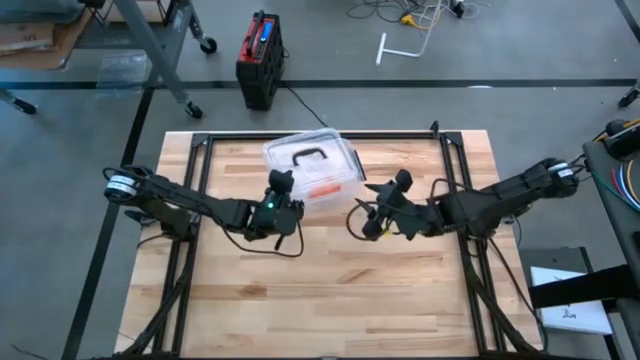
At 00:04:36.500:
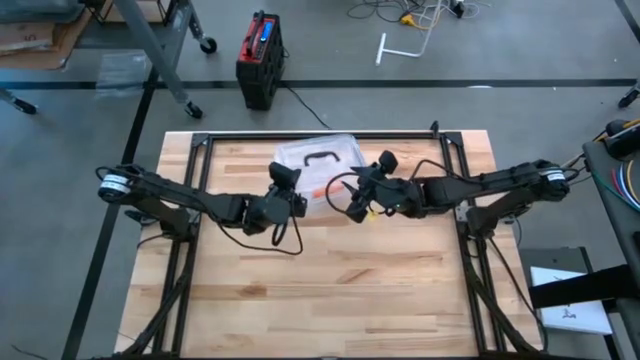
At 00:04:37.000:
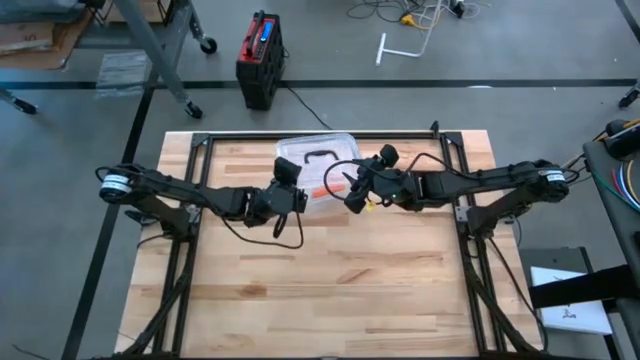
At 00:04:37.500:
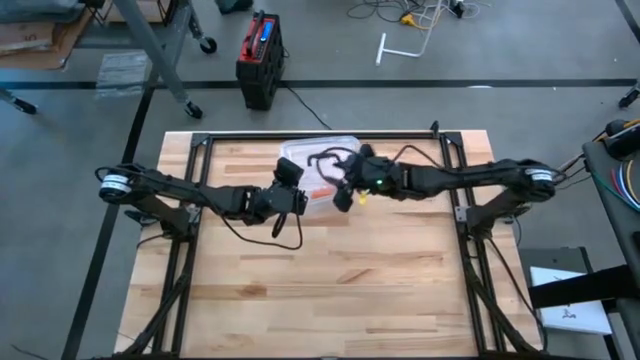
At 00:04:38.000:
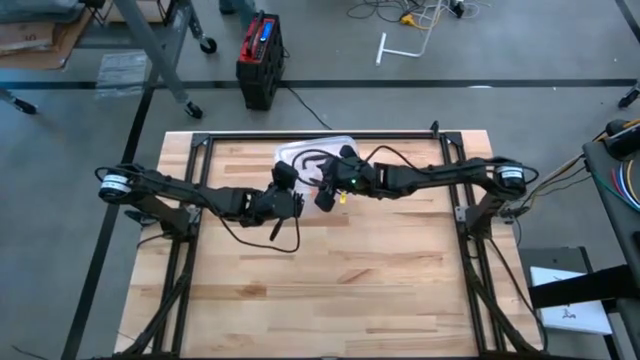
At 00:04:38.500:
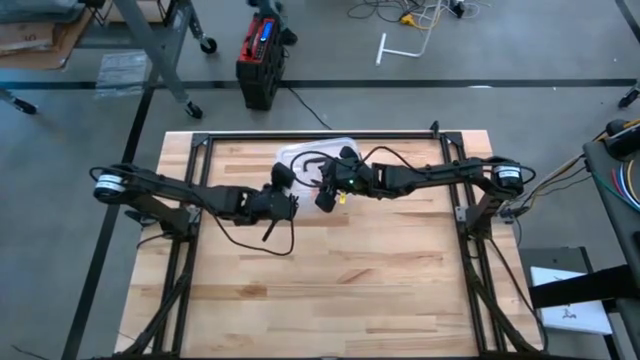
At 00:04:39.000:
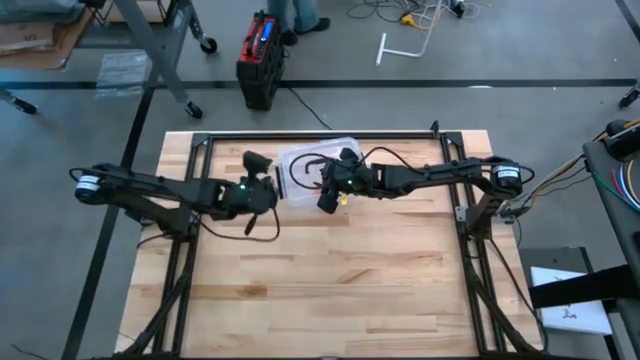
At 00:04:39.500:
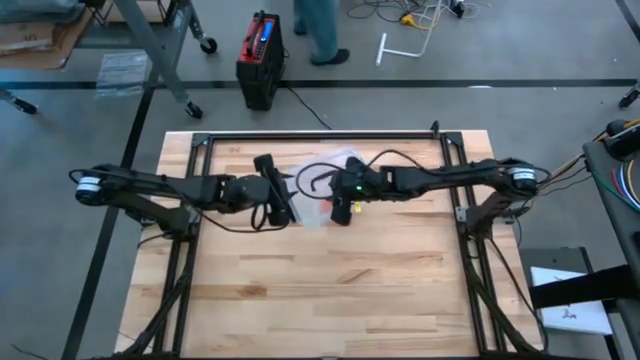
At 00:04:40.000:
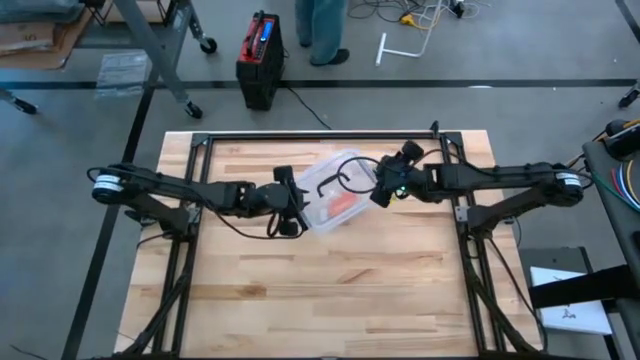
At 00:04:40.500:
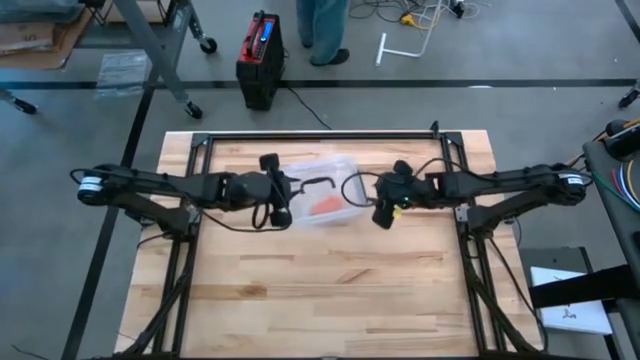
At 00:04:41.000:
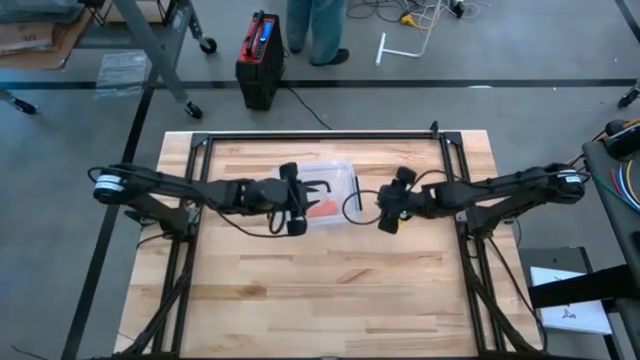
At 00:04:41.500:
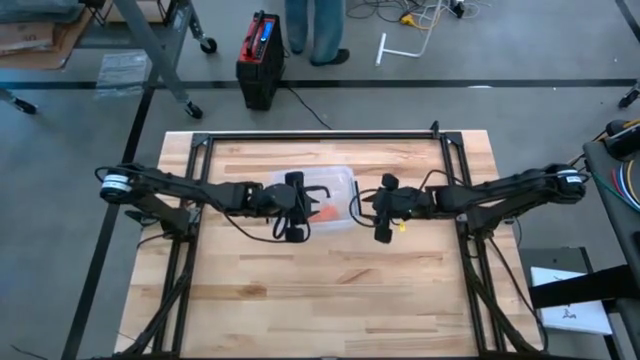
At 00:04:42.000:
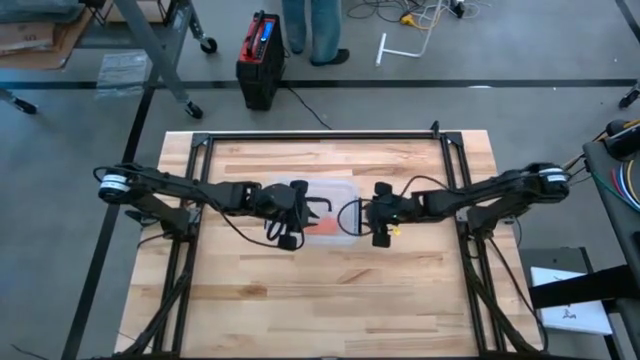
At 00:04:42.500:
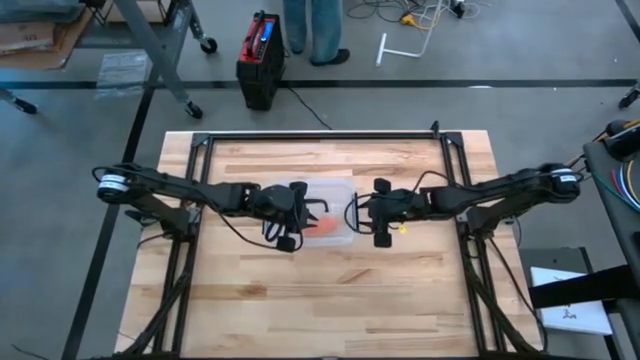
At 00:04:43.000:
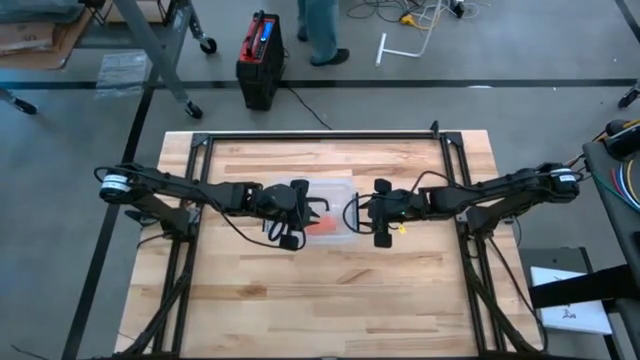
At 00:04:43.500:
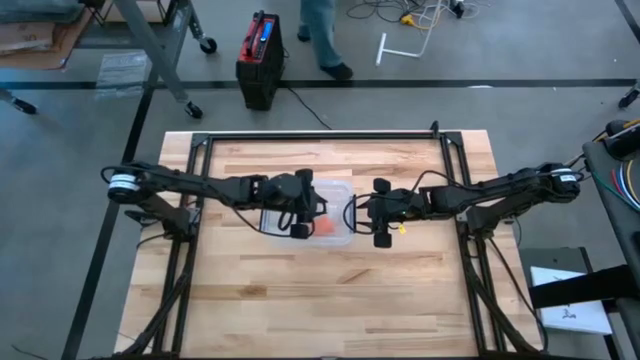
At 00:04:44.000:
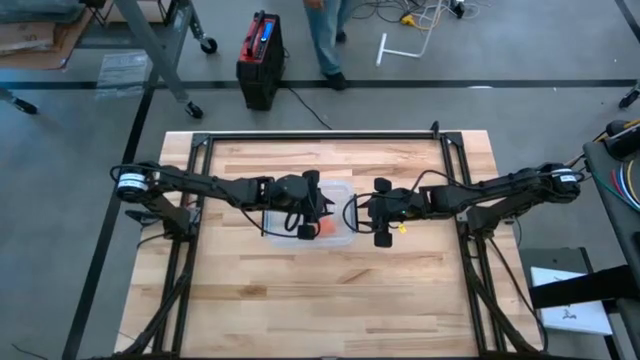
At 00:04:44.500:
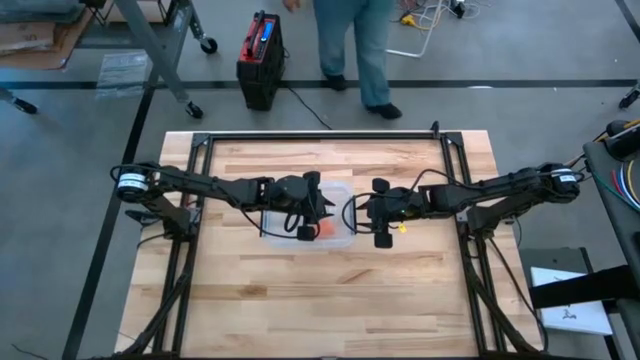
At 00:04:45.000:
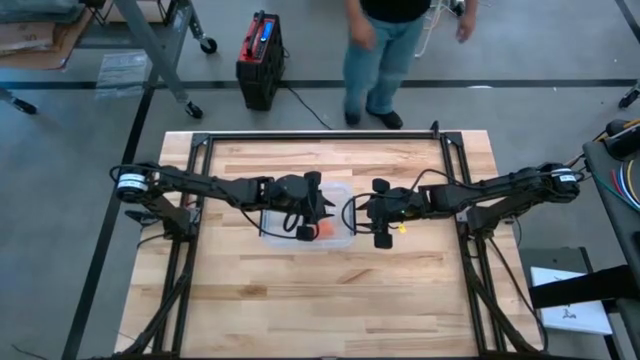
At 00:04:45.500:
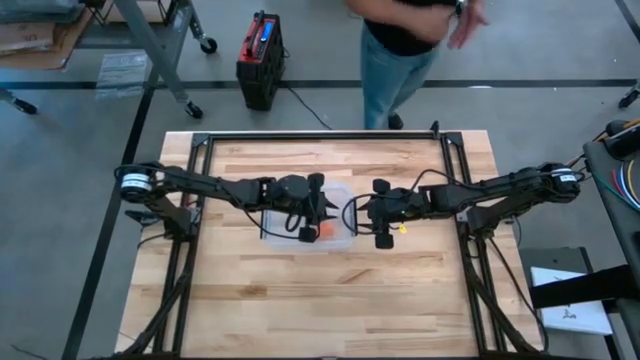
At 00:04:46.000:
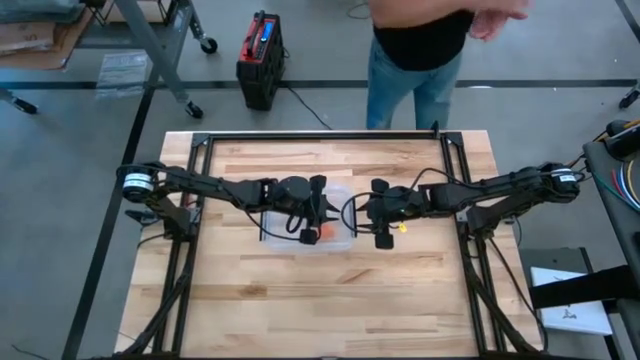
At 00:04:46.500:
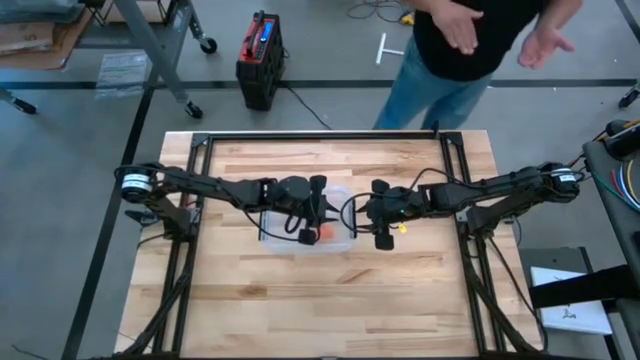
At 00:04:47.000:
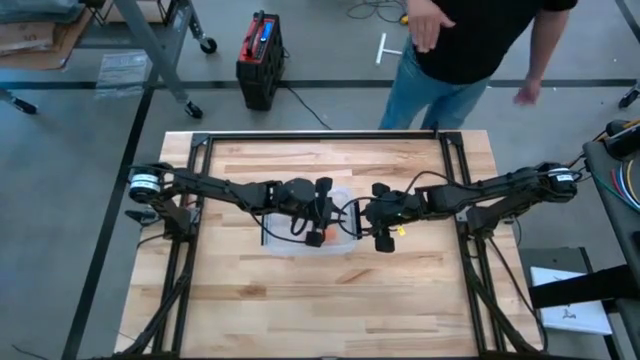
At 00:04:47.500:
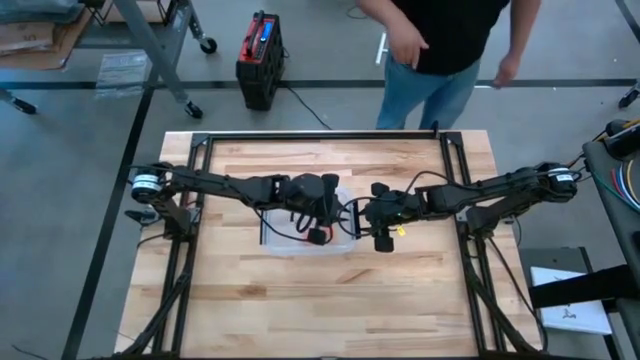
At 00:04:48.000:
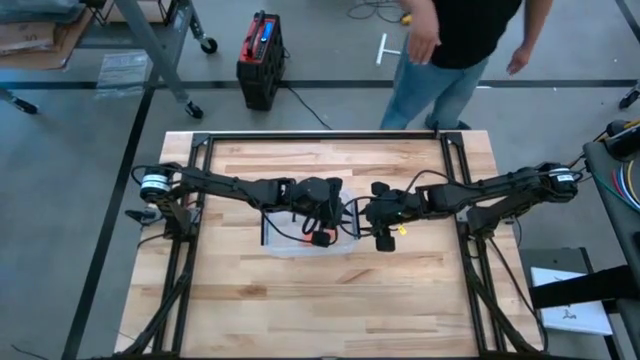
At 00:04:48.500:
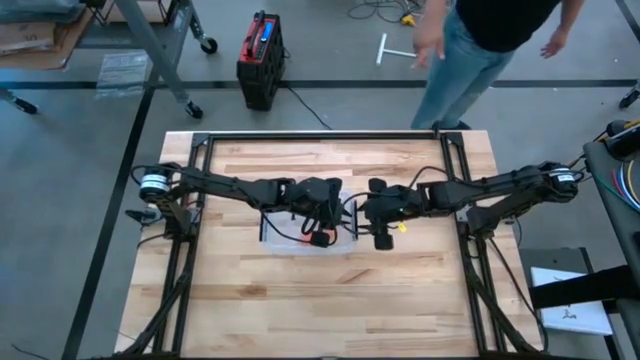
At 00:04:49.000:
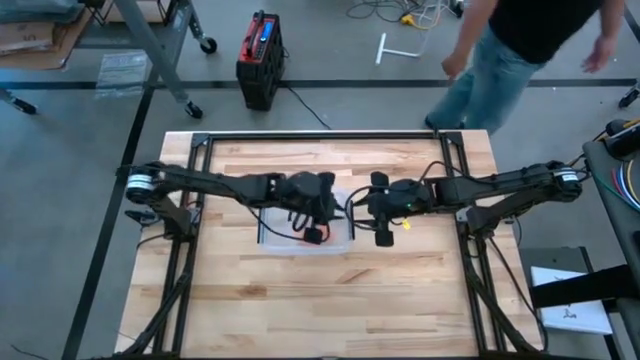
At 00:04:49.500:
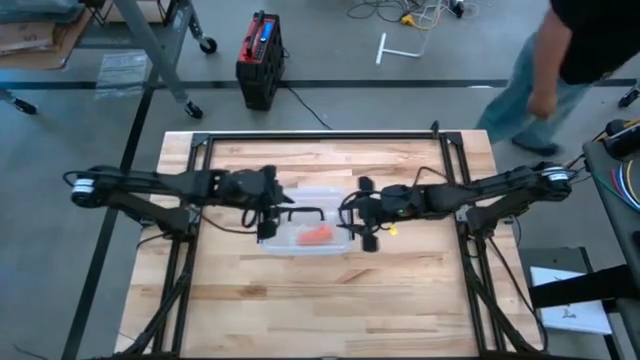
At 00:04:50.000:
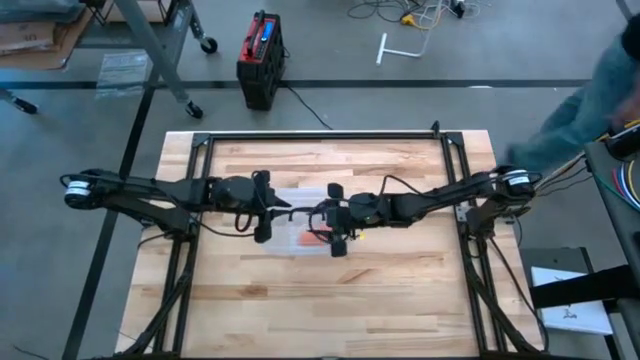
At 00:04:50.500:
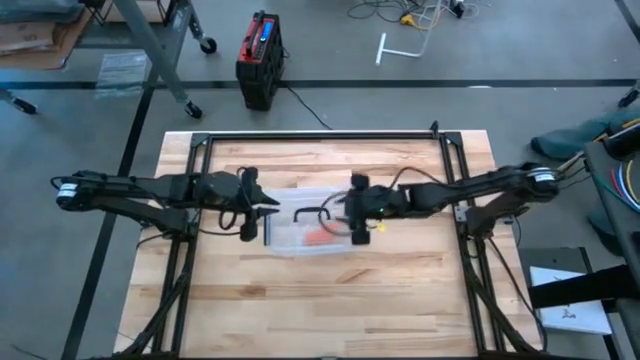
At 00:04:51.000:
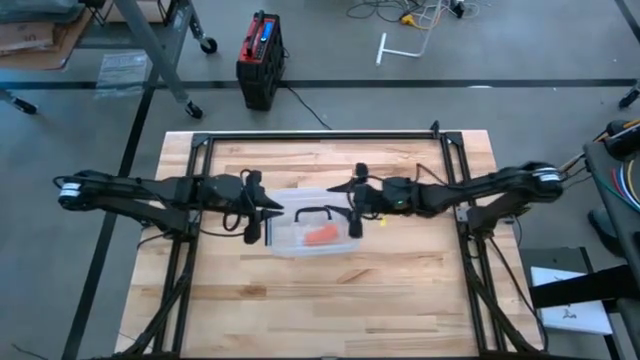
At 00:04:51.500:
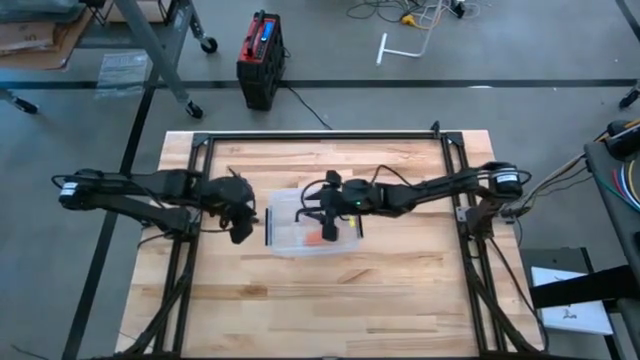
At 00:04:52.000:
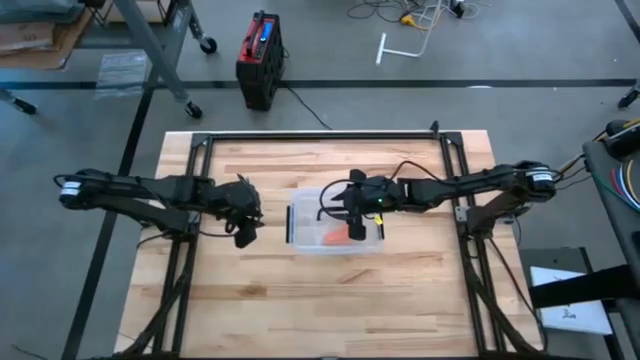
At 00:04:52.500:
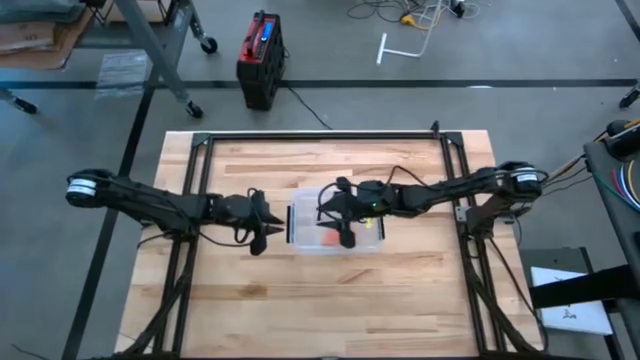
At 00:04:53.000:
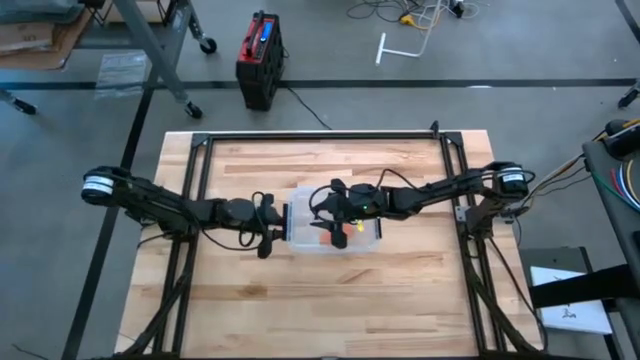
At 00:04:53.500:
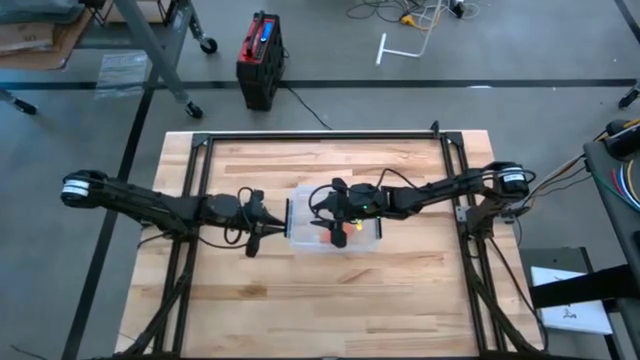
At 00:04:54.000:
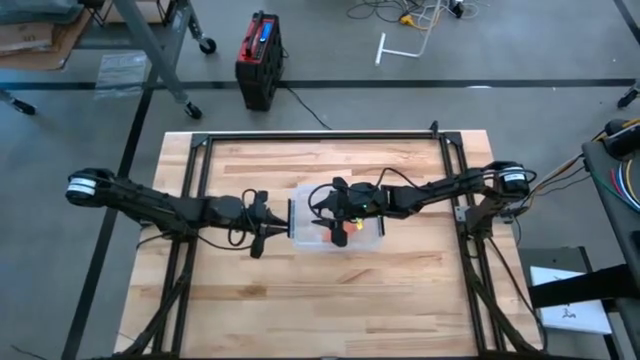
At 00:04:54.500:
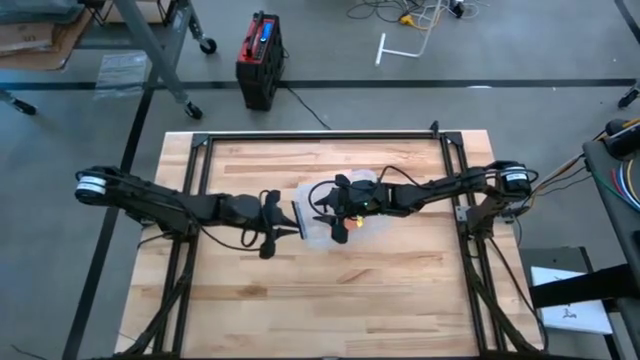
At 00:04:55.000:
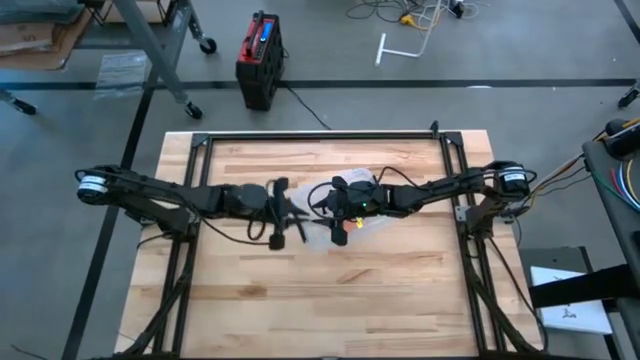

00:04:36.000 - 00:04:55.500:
Task: Roll bandage
Close the transparent bin

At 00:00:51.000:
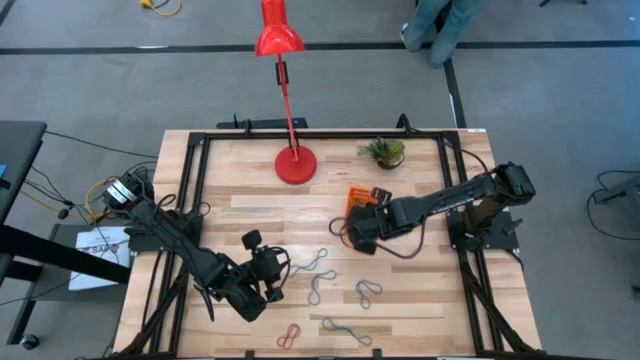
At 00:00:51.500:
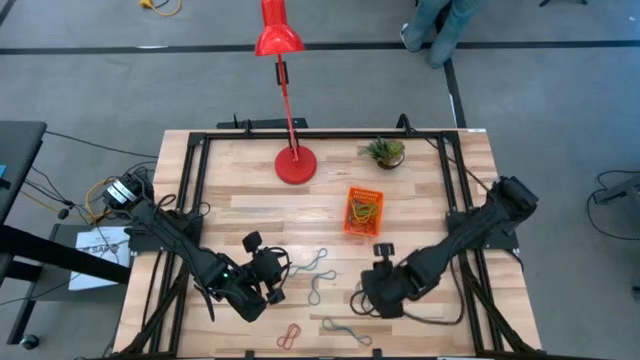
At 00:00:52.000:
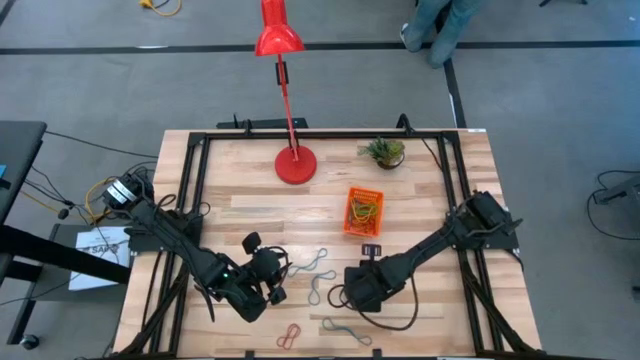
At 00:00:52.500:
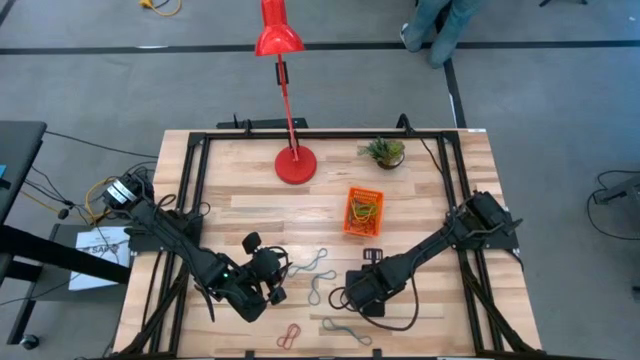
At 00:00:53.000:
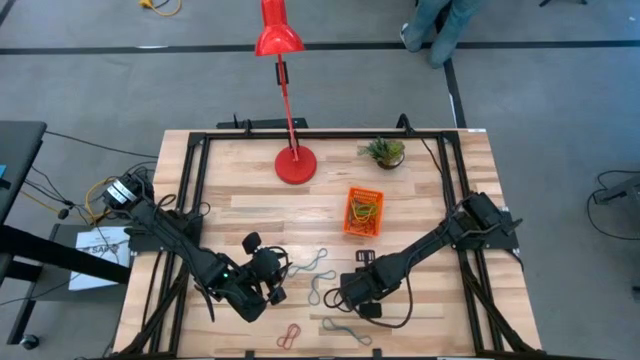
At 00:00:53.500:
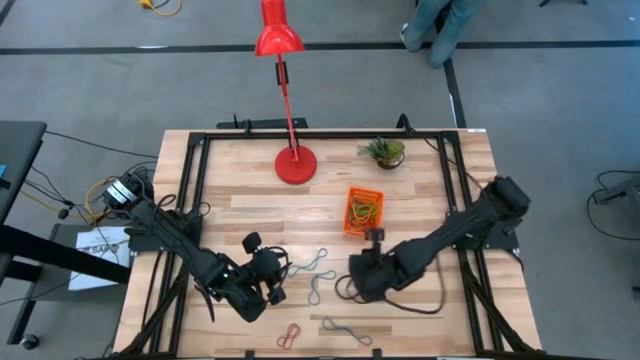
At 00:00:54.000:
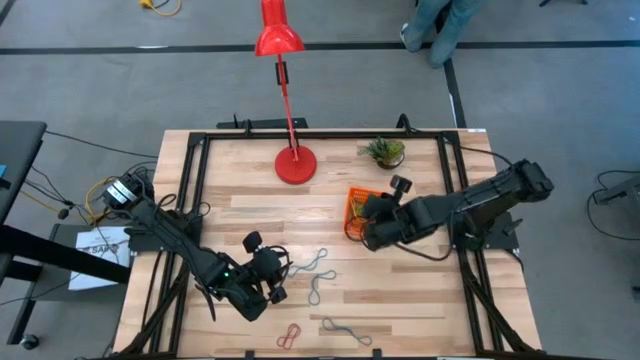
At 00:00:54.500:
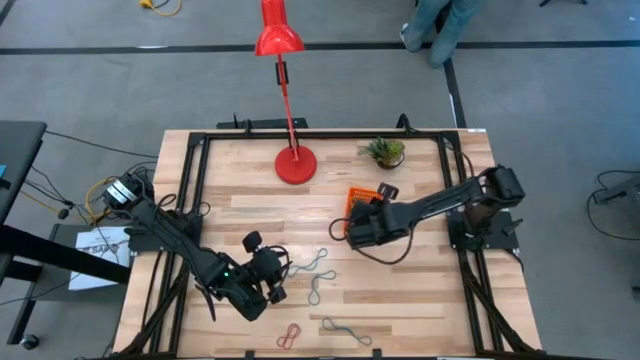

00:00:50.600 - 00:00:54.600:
Task: Pick and place items into bin
Put the middle right blue rubberband into the orange basket
